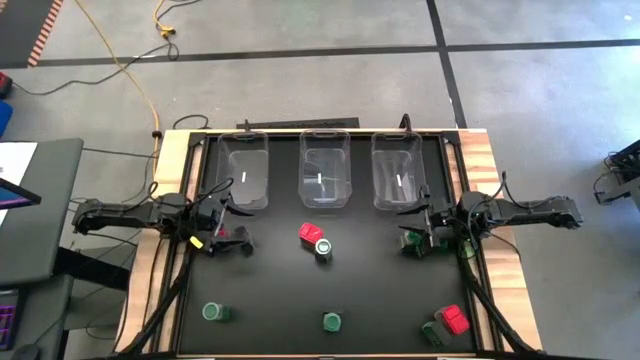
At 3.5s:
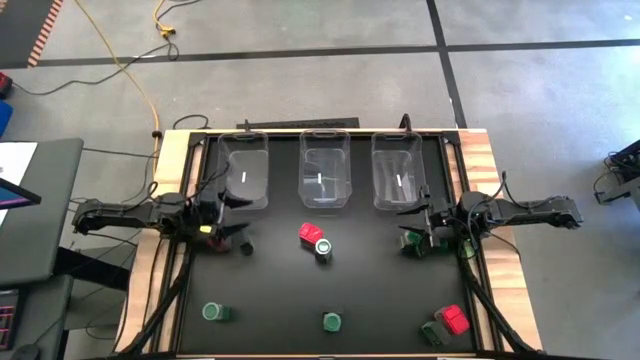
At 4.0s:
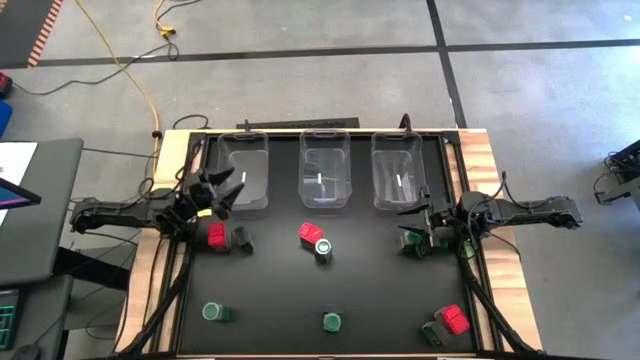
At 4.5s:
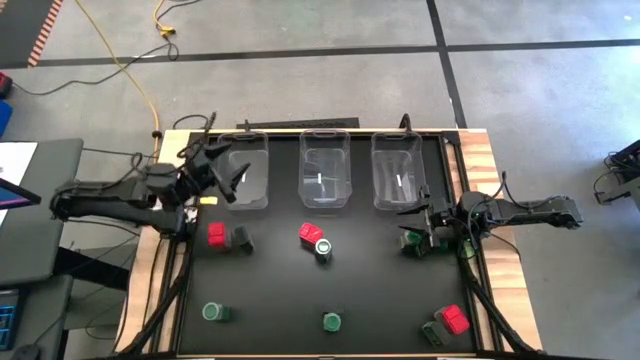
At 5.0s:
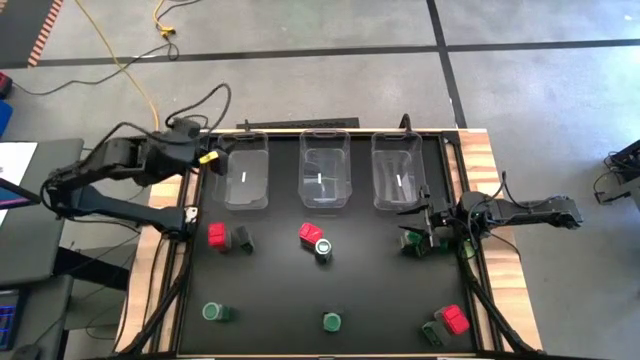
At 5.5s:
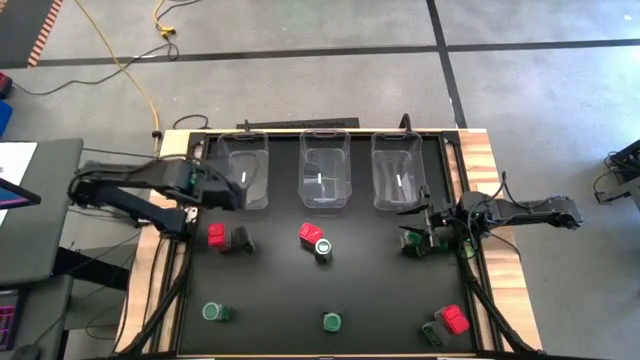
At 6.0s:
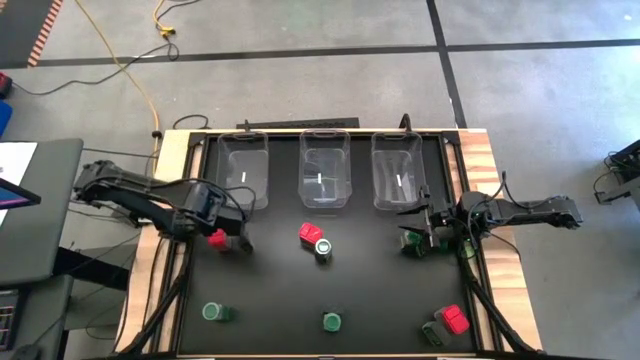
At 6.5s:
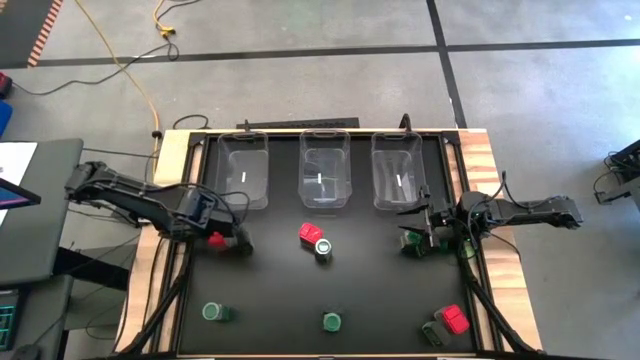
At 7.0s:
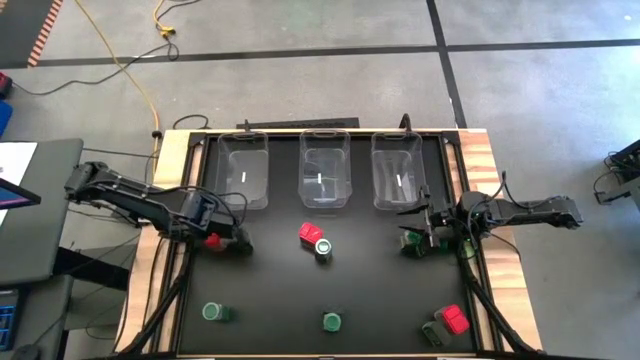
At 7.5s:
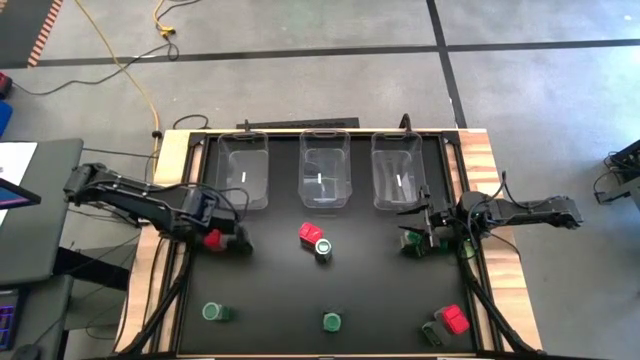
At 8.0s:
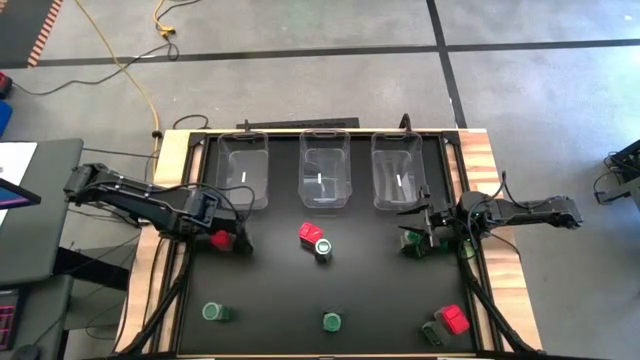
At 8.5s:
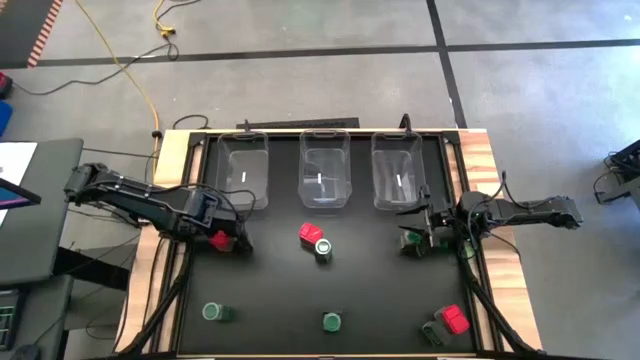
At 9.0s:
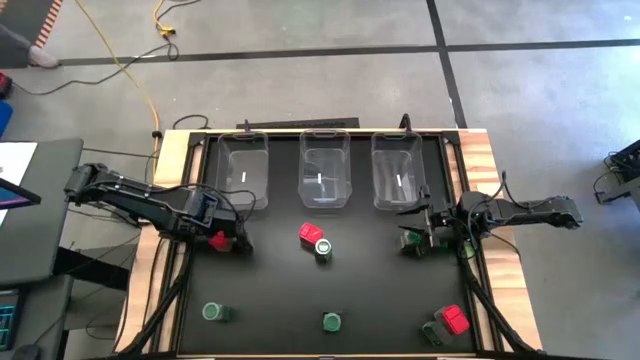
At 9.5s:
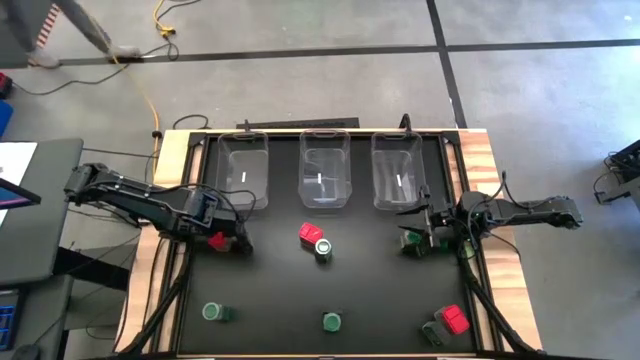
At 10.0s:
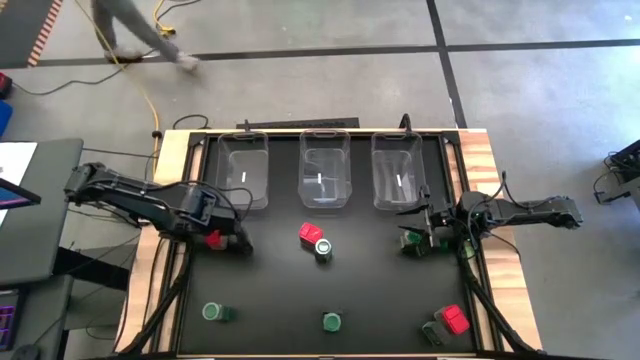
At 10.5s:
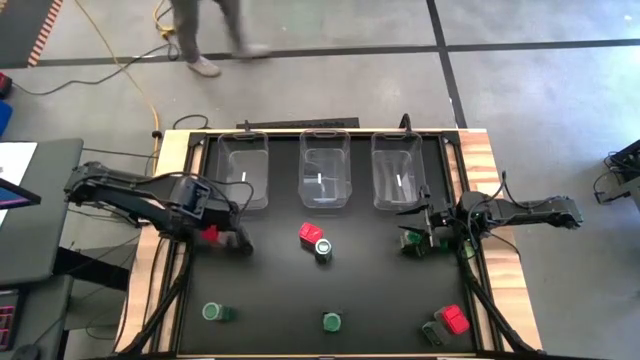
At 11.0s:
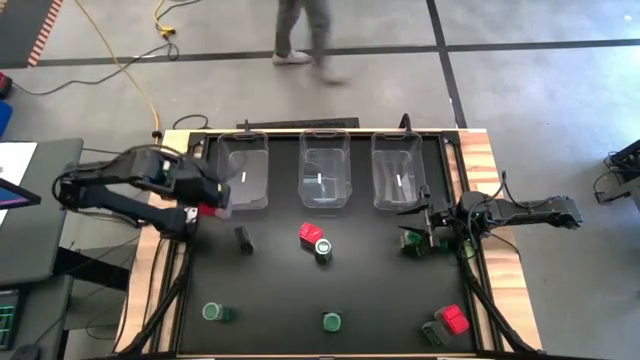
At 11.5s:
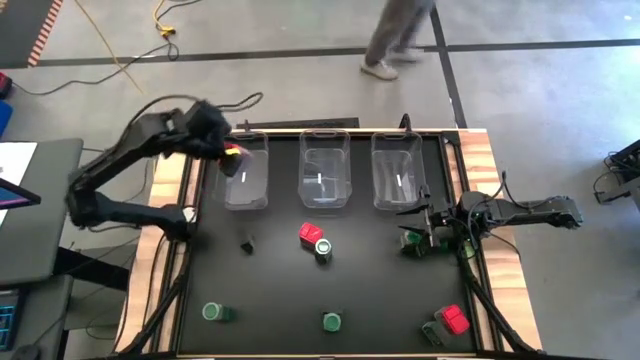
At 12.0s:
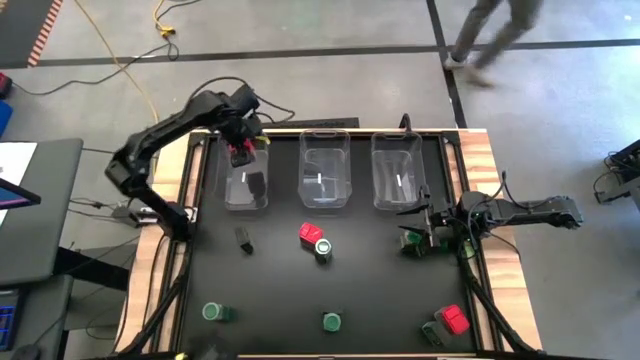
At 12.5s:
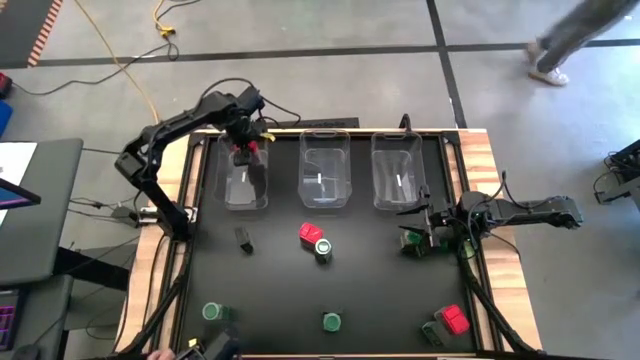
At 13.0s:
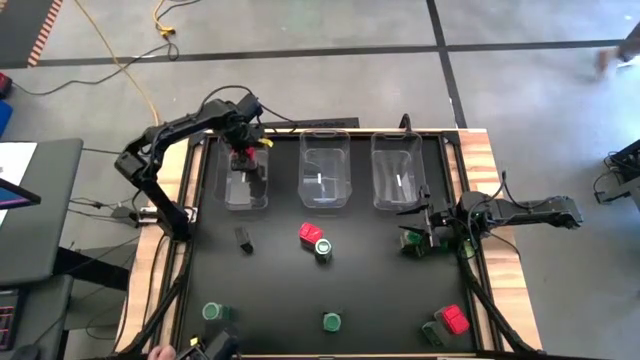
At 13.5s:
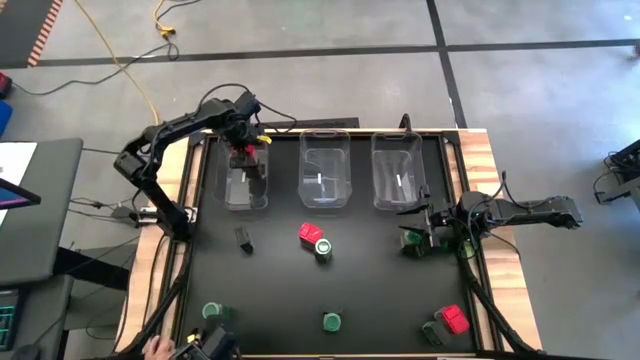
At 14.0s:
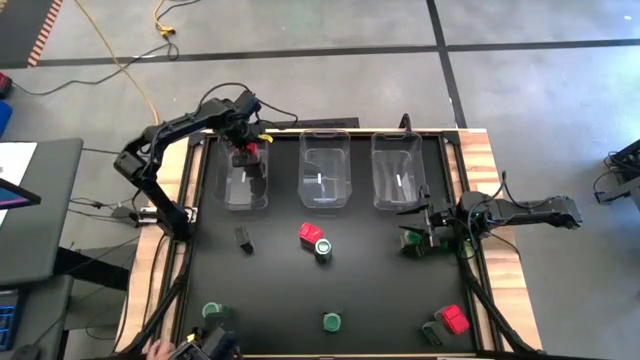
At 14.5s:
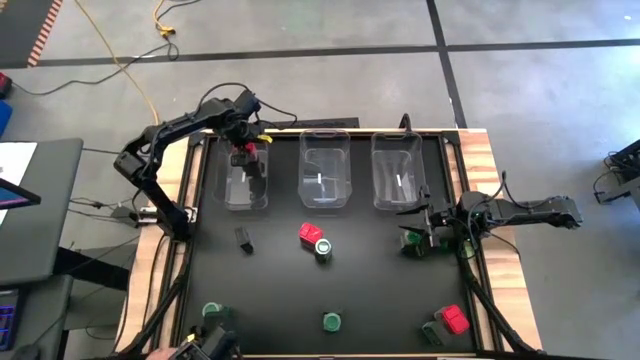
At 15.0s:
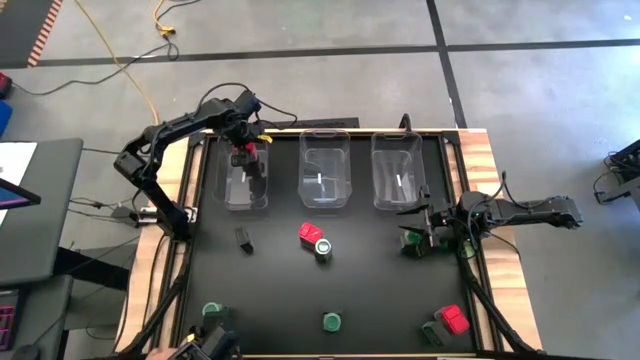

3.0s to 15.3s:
Task: Sort spices by type
Put the red seasoning can into the left transparent bin

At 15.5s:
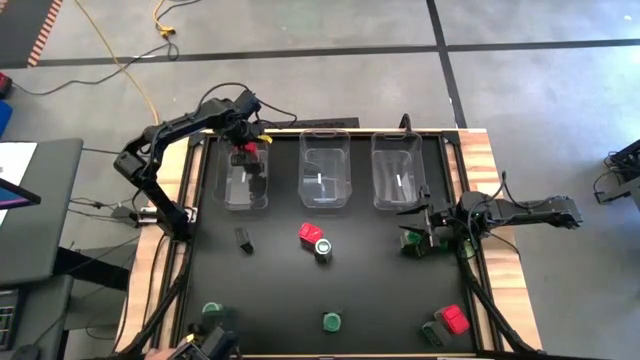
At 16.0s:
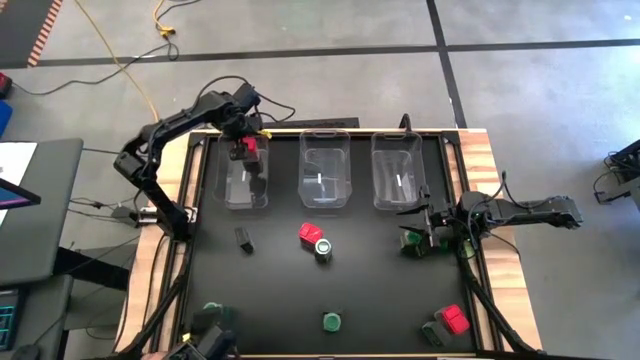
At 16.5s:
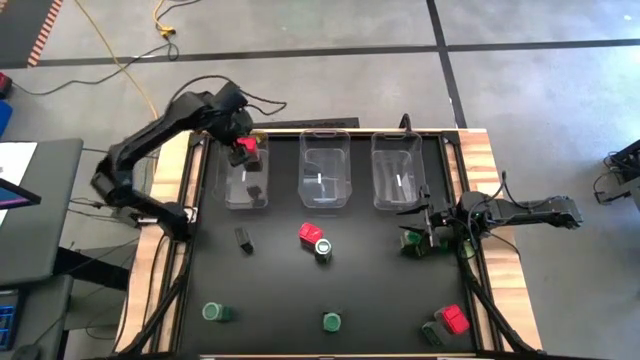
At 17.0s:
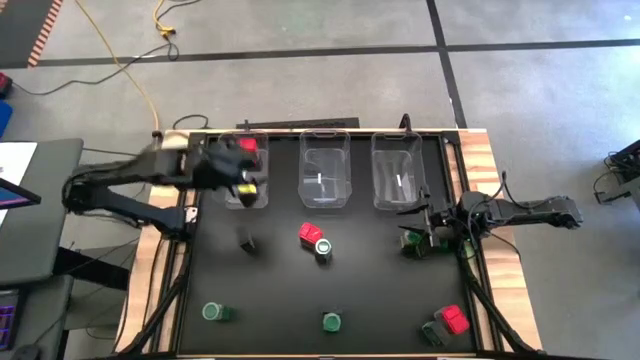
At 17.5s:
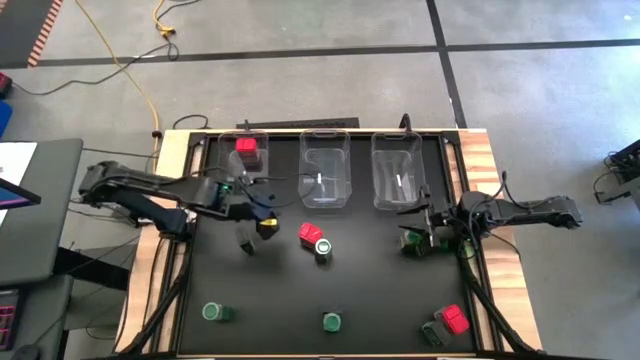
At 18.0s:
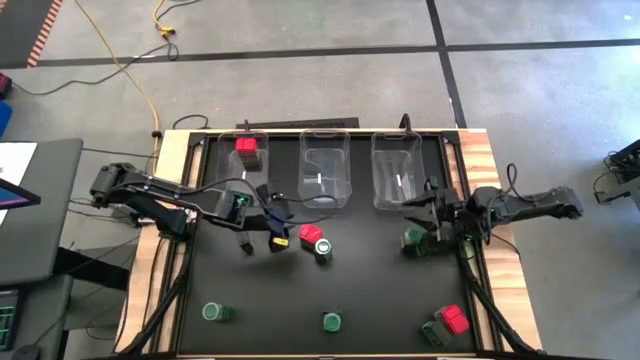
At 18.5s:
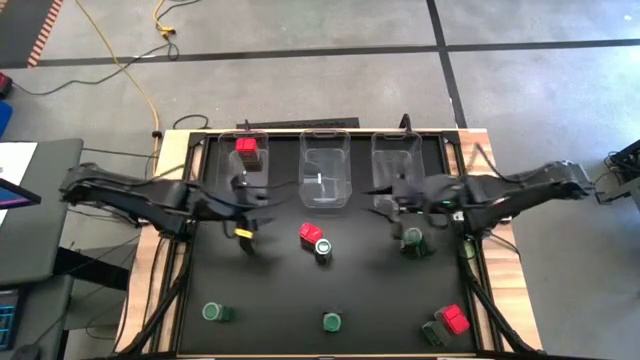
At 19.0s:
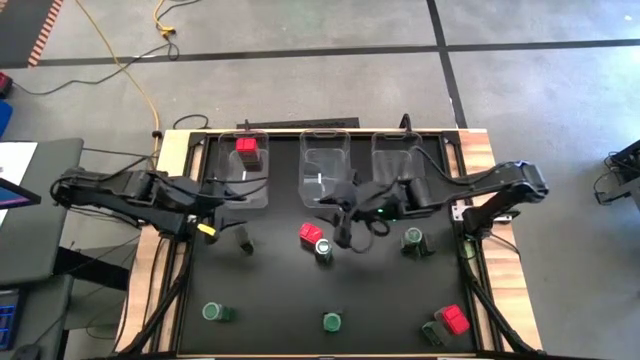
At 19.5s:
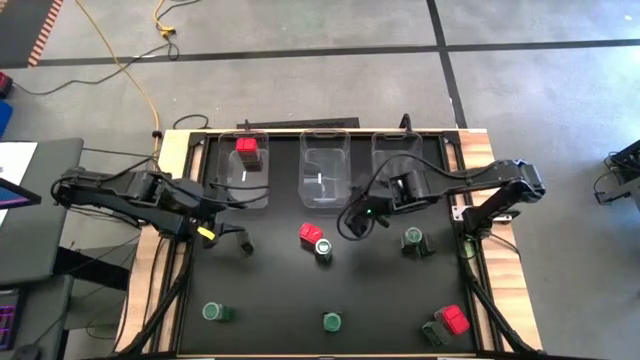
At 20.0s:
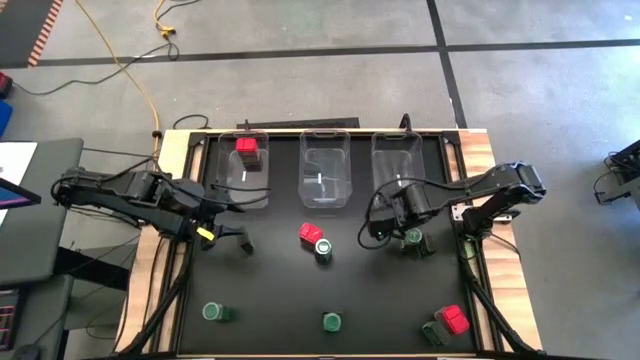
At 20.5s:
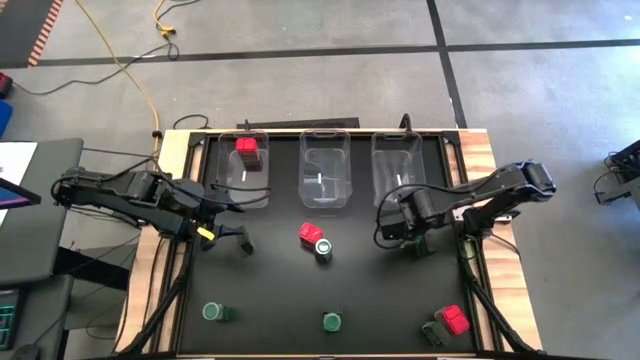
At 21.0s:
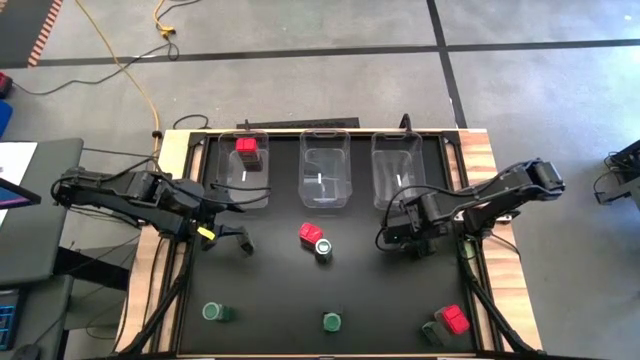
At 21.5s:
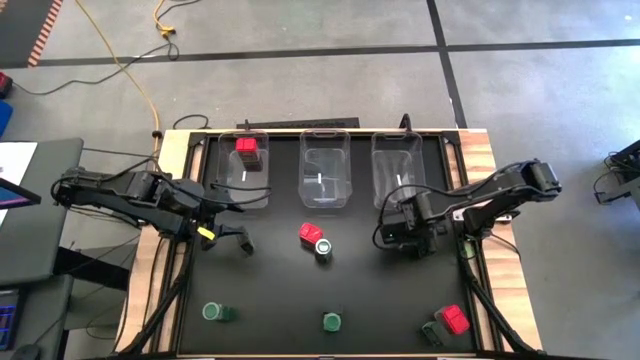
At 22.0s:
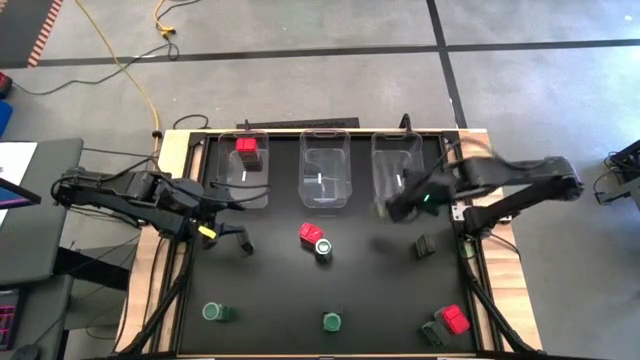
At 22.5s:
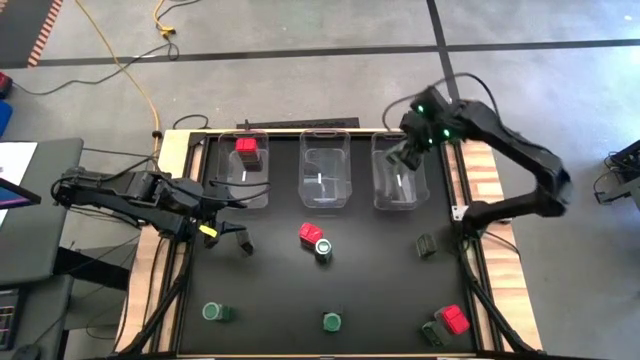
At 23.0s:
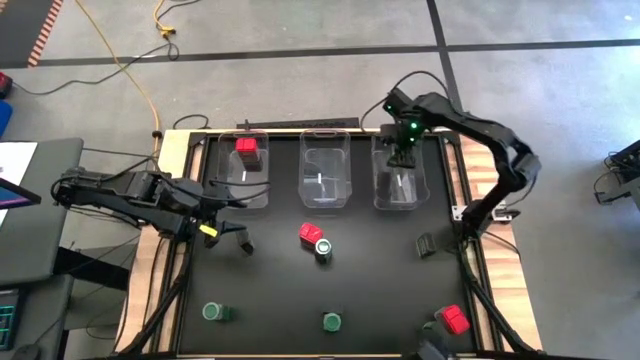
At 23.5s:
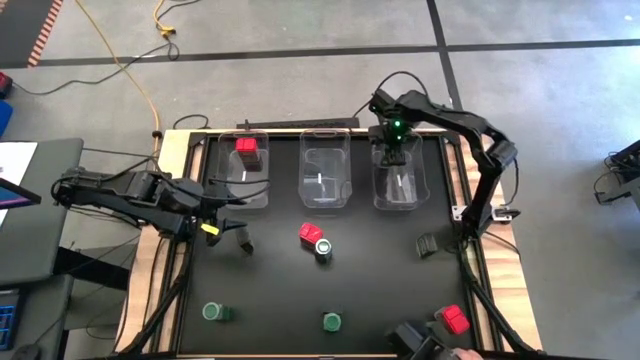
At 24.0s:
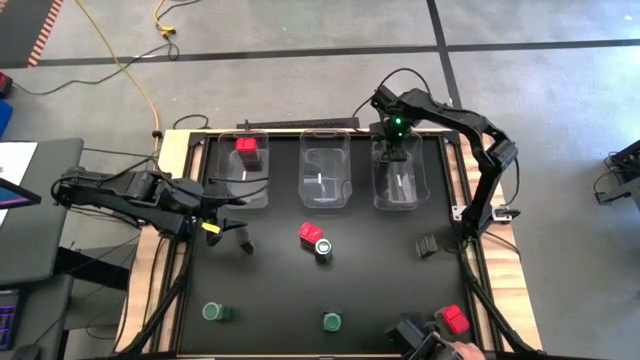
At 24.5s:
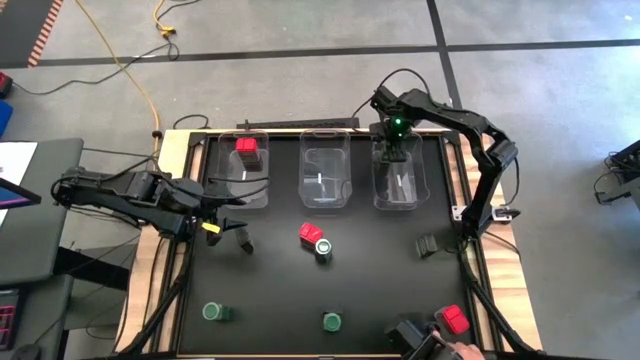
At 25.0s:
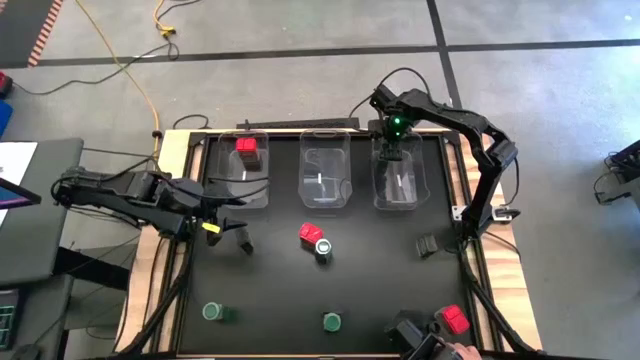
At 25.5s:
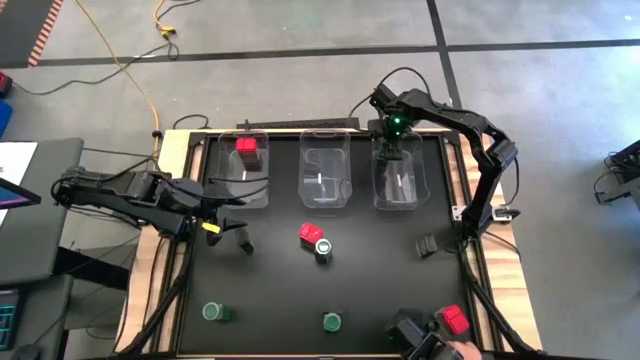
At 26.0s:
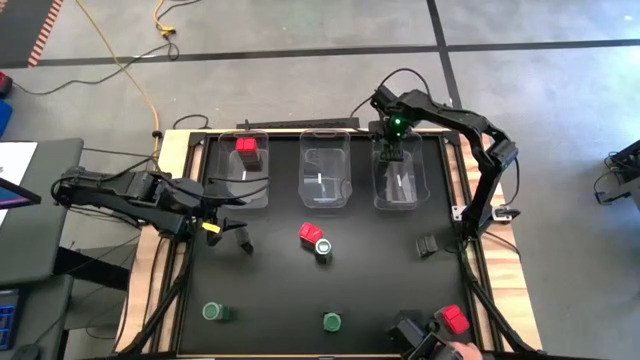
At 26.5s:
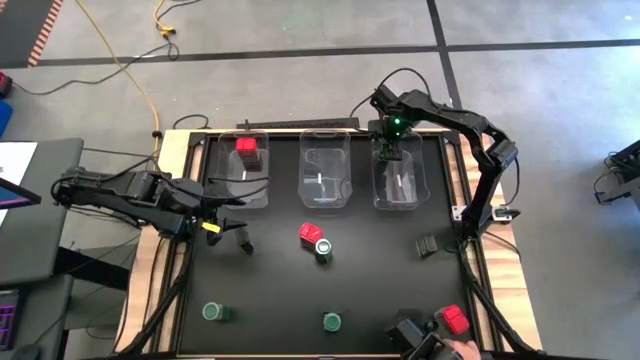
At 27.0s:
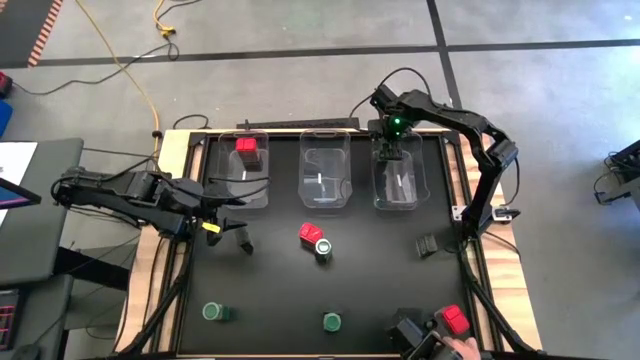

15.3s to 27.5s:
Put the green seasoning bottle into the right transparent bin
